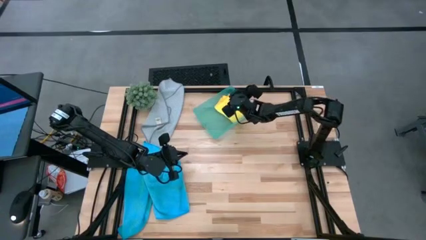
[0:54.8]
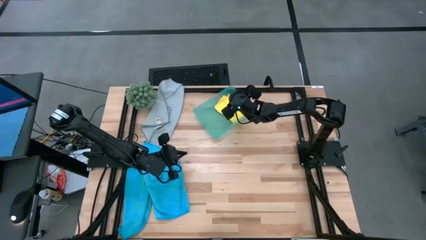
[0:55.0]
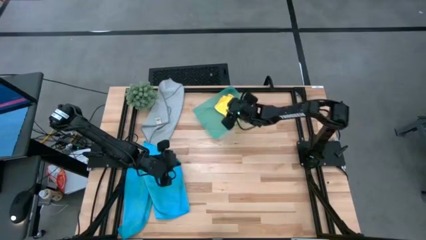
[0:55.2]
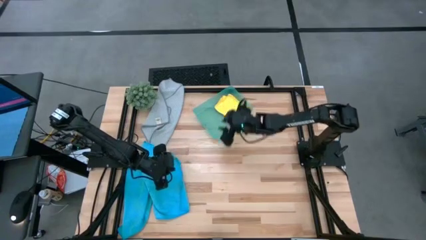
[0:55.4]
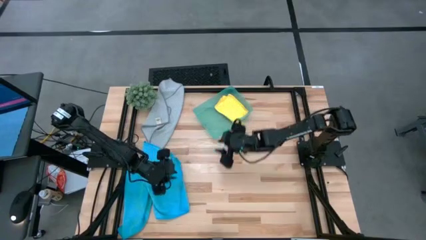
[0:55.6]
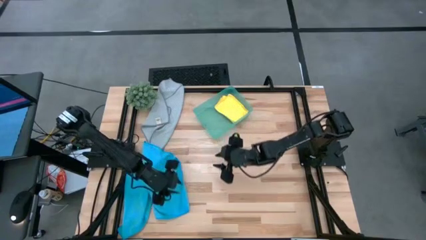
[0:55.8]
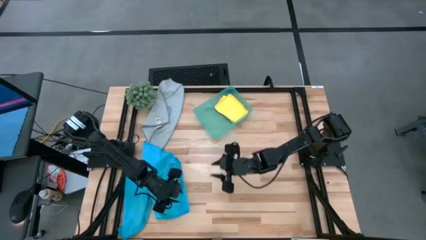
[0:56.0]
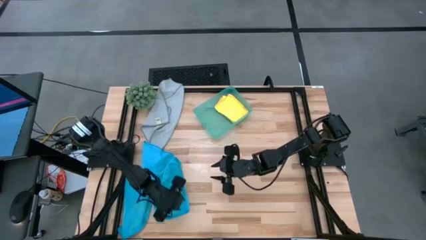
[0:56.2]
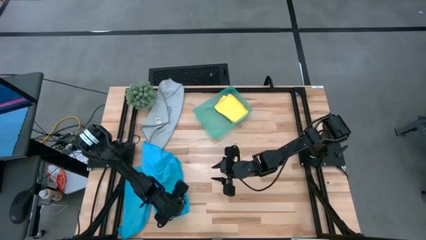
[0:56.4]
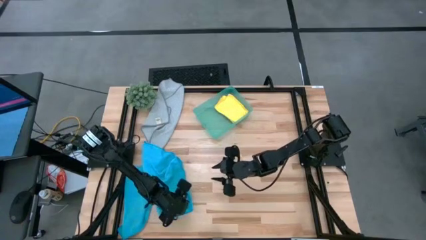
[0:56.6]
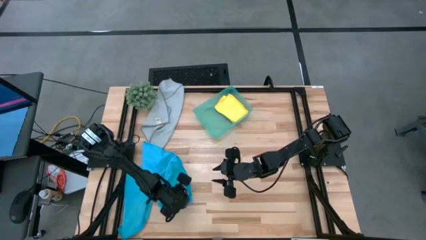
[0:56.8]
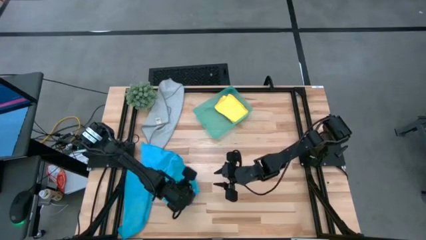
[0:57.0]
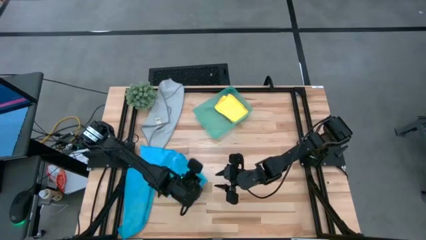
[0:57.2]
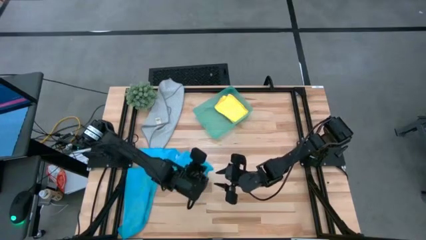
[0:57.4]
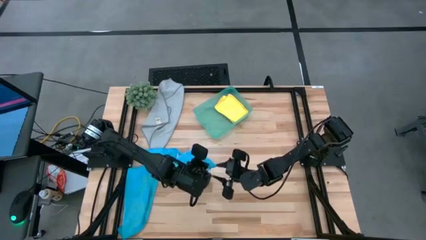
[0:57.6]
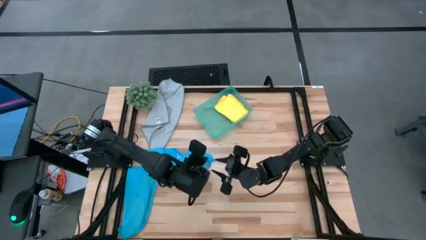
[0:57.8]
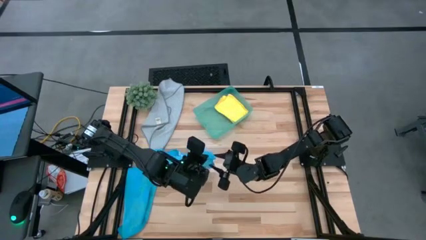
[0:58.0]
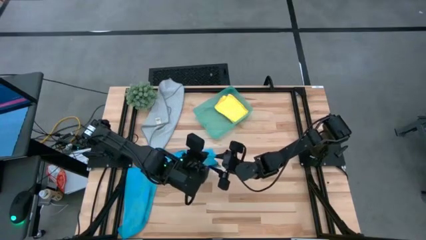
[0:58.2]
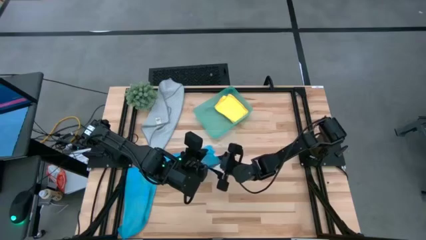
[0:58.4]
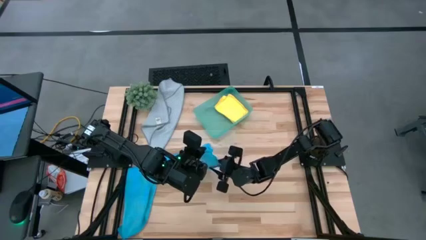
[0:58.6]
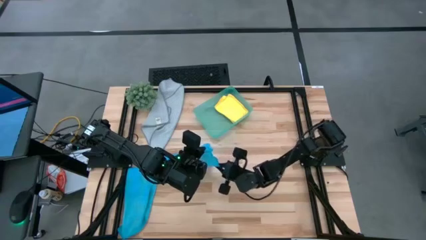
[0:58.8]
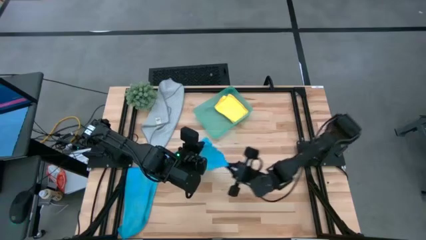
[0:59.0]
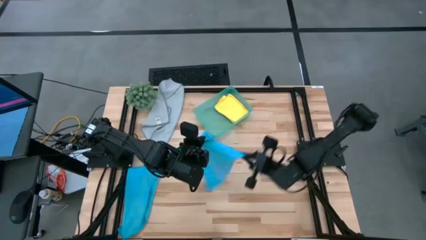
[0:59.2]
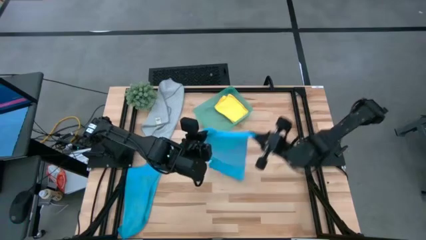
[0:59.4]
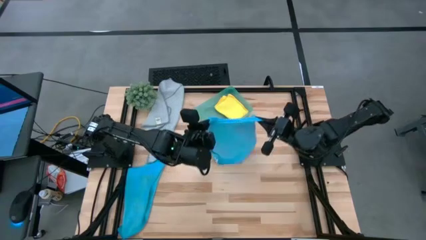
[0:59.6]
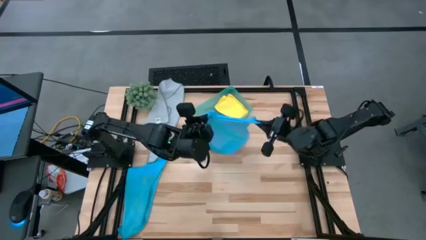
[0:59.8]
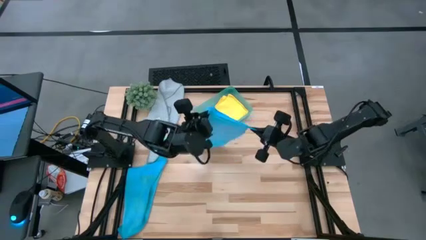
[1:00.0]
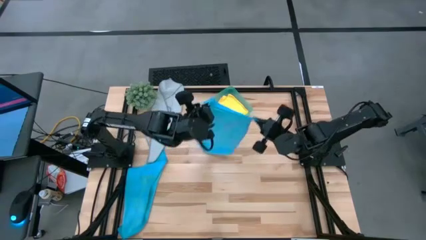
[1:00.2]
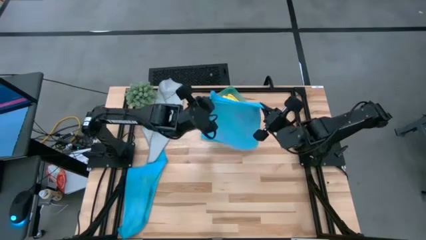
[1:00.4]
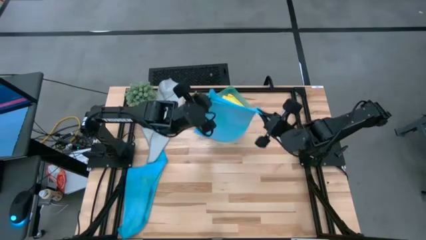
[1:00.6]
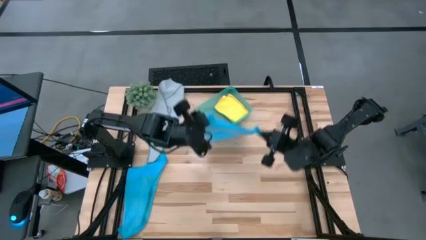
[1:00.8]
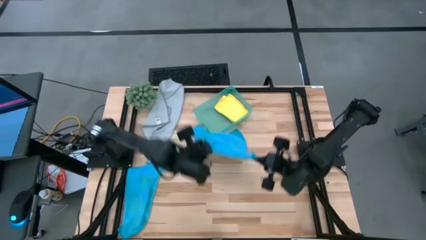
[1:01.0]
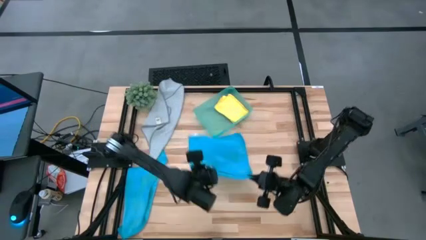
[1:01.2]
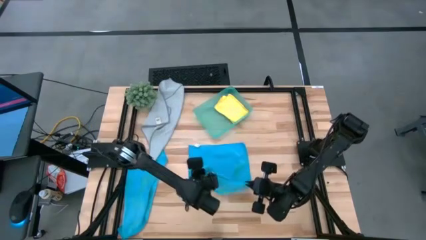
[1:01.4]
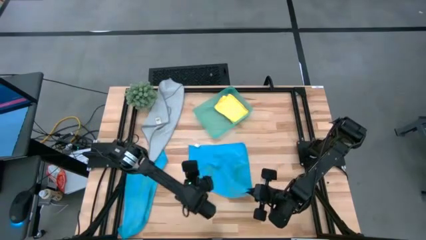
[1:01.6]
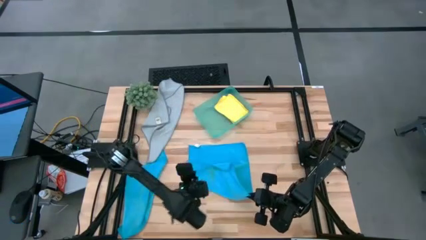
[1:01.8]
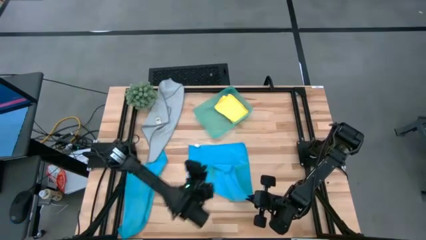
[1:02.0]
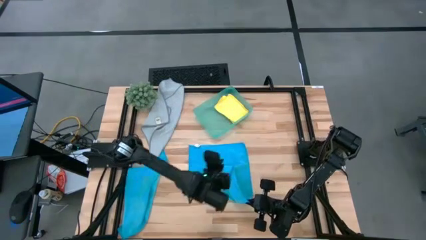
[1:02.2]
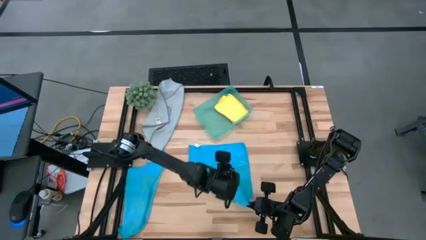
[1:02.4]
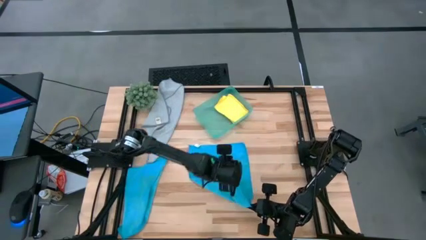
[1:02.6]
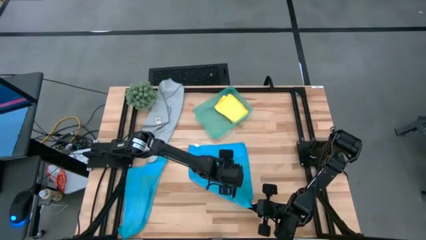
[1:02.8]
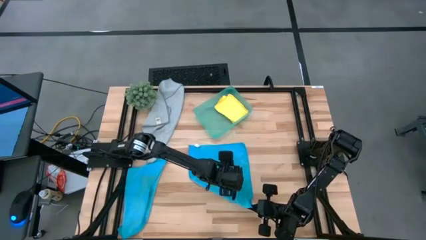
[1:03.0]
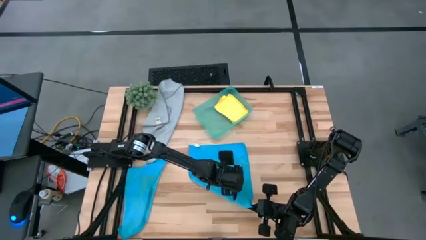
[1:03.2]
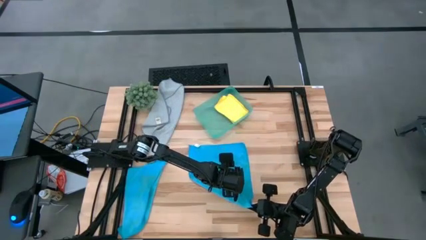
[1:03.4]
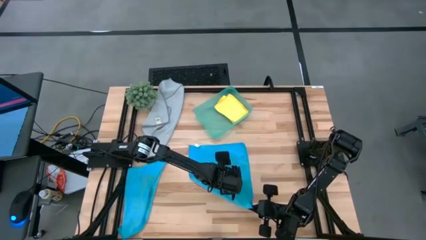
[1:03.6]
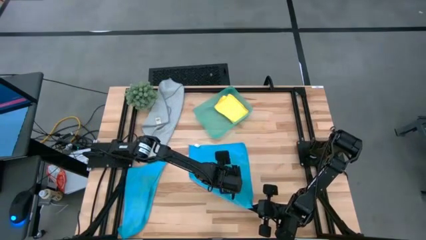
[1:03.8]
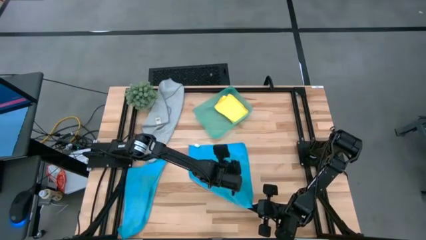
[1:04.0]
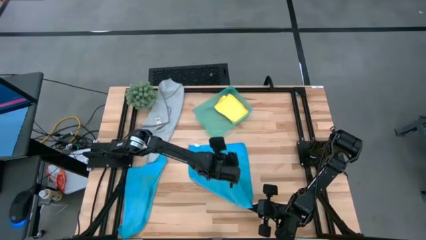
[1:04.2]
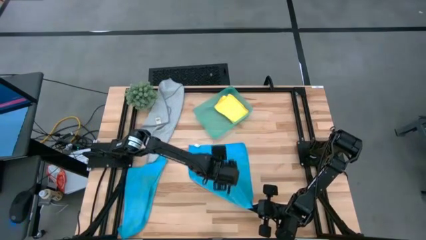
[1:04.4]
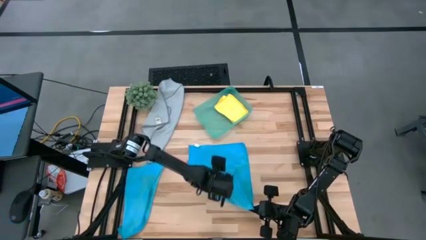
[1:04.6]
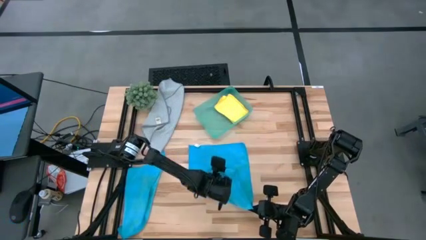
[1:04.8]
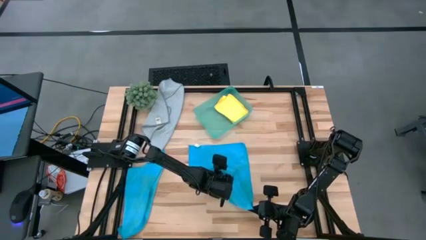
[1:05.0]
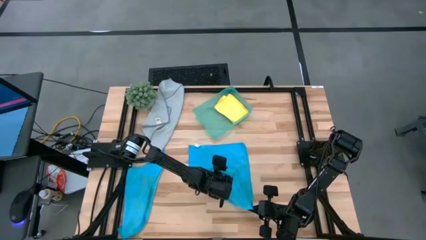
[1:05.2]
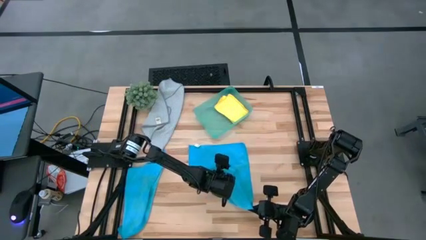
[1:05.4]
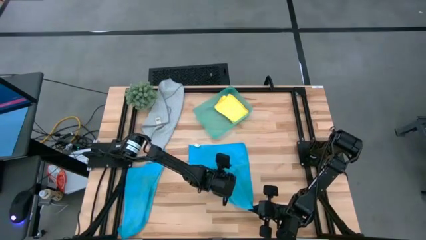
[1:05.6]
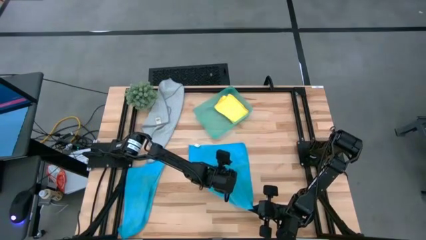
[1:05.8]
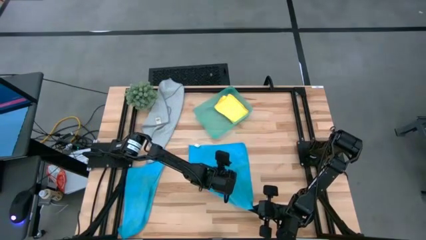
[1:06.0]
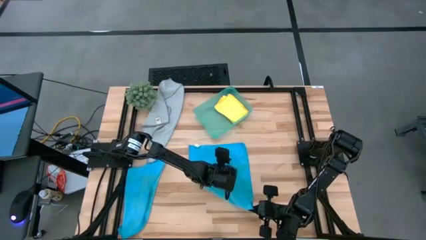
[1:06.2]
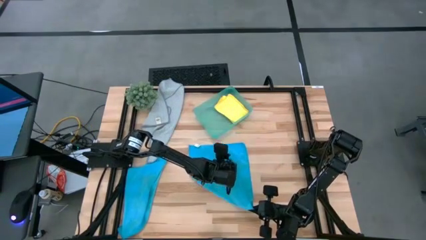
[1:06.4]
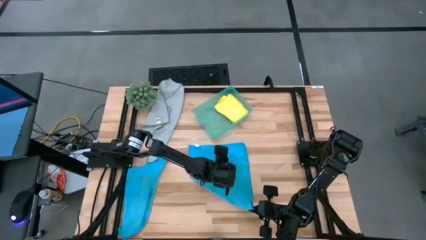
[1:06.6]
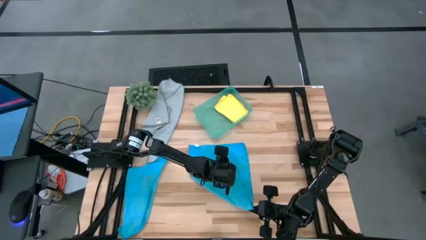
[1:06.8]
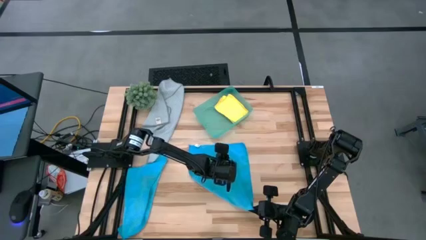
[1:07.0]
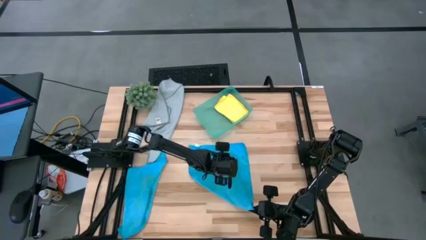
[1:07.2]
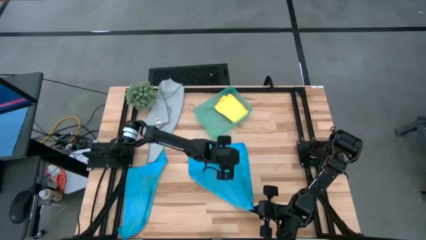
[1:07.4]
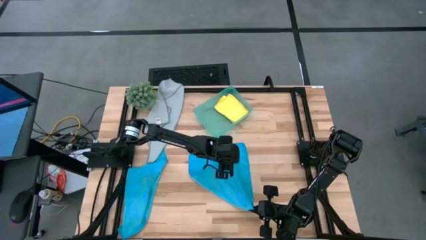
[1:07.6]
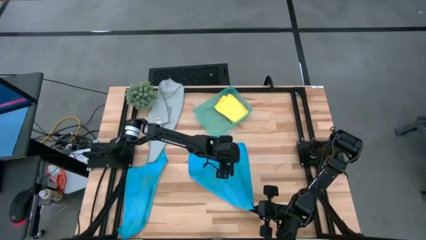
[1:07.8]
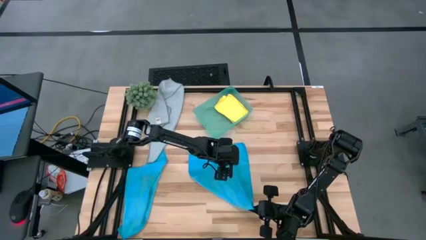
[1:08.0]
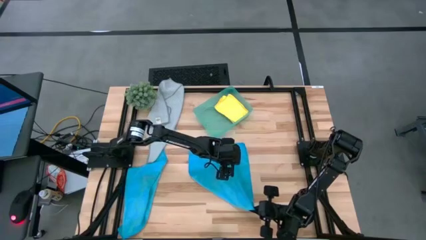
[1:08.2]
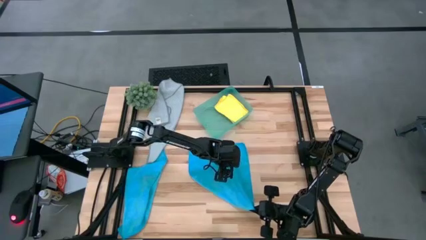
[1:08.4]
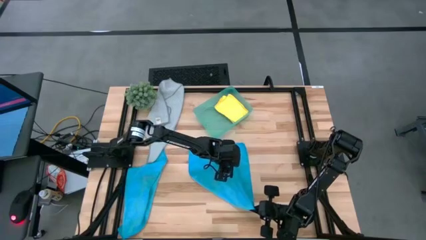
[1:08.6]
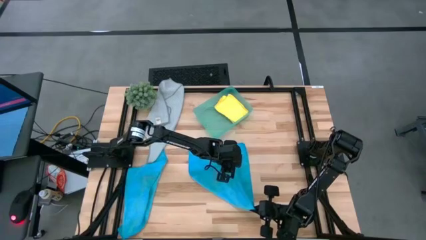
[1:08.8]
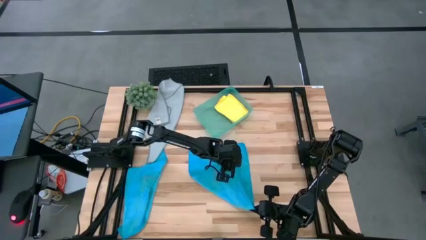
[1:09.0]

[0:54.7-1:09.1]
Task: Fold microfiber towels
Fold the right blue microfiber towel

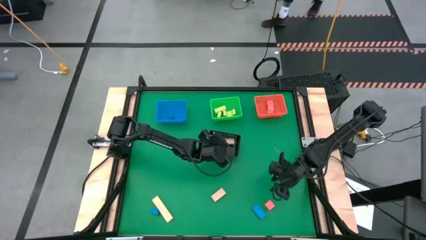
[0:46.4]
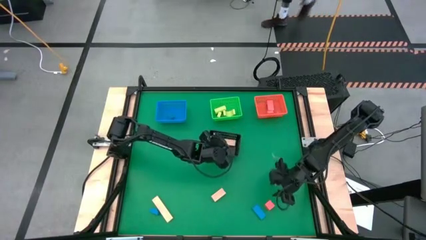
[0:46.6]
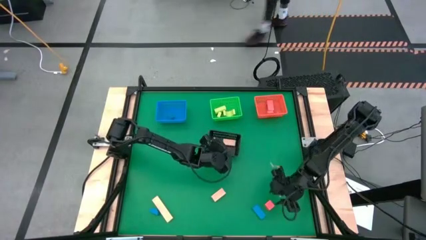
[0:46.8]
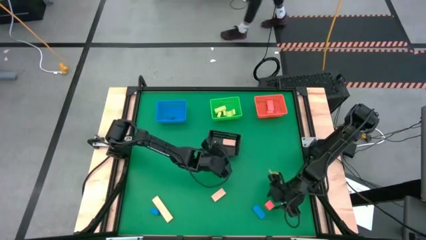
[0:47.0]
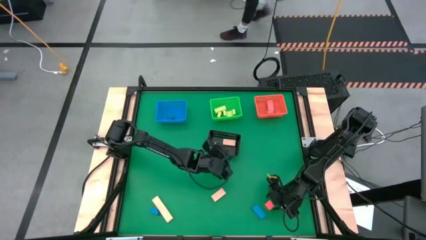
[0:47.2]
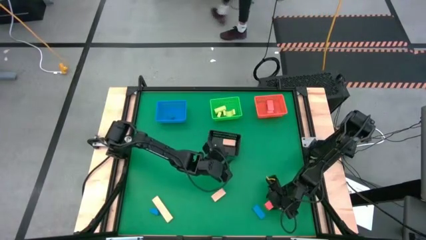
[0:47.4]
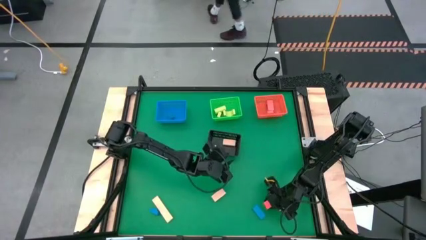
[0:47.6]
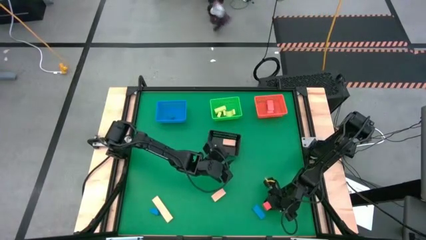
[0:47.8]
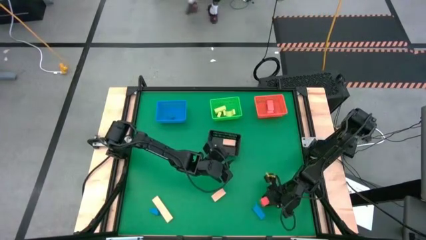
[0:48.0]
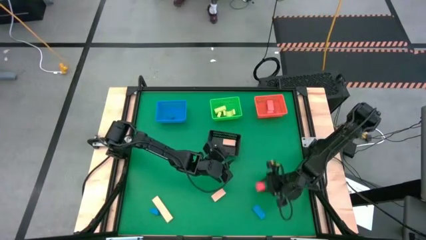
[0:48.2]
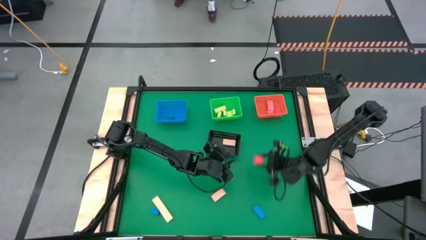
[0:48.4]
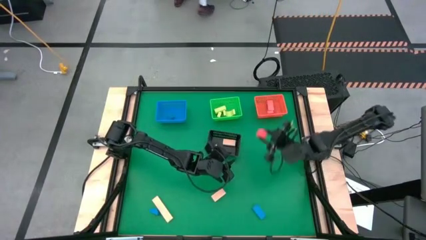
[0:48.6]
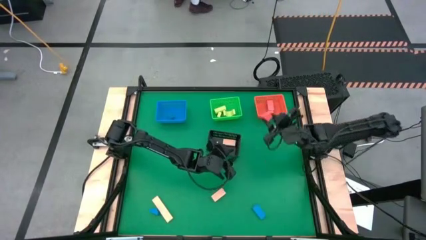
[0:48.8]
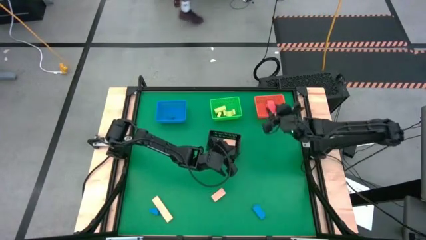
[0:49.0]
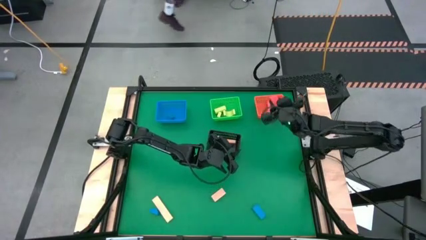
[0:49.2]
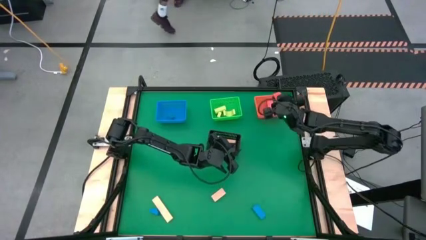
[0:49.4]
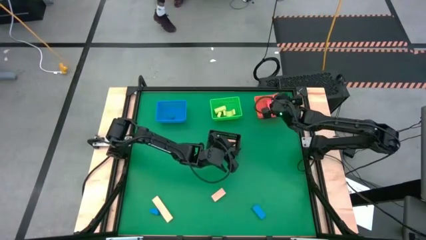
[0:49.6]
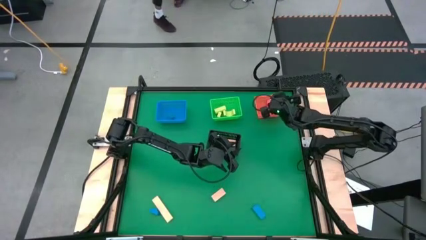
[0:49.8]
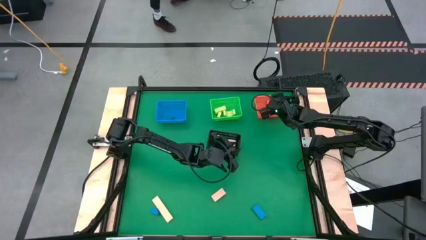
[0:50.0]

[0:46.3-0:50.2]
Task: Sort & place blocks by color
Put the orange block into the orange bin
